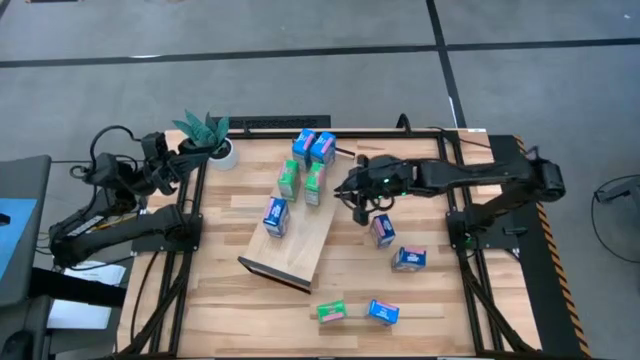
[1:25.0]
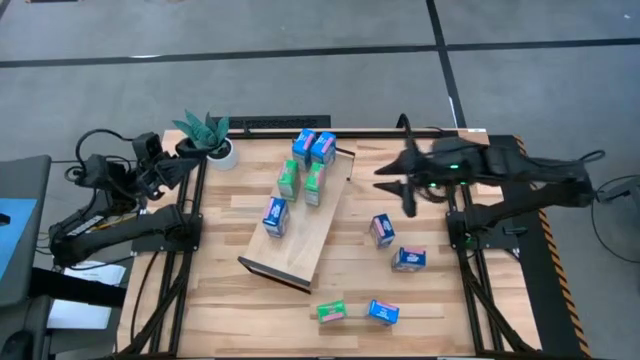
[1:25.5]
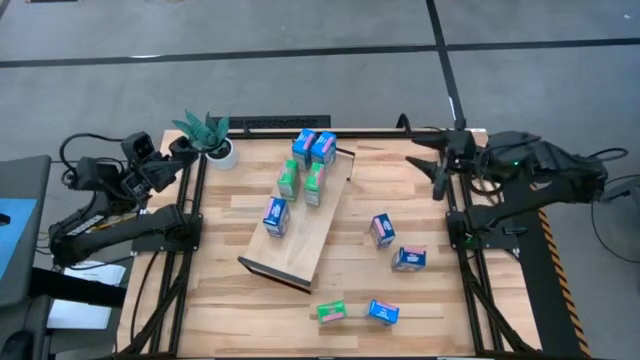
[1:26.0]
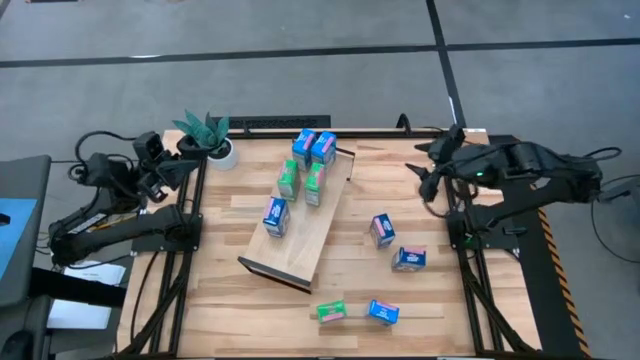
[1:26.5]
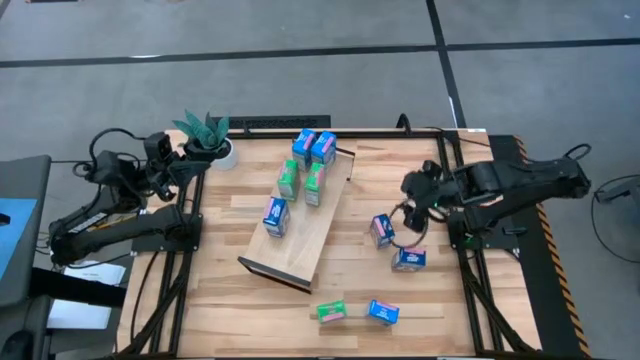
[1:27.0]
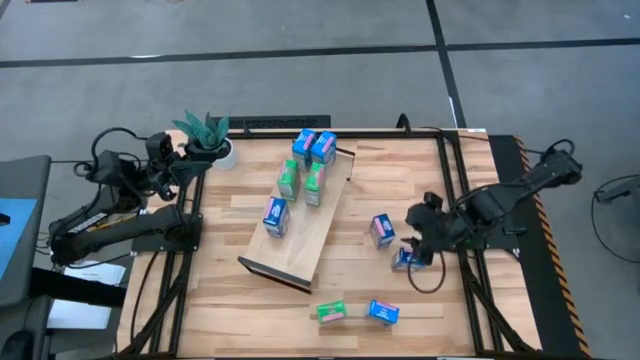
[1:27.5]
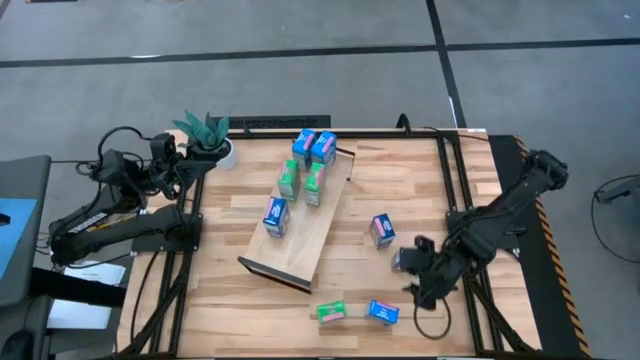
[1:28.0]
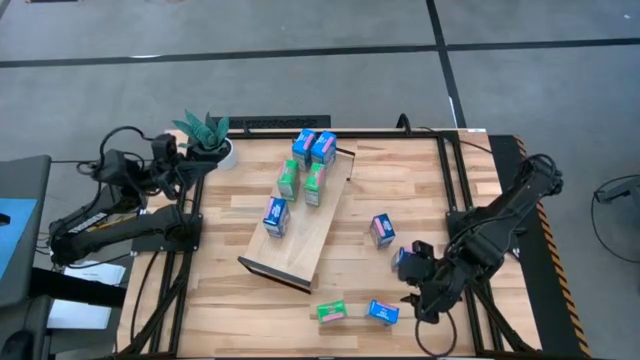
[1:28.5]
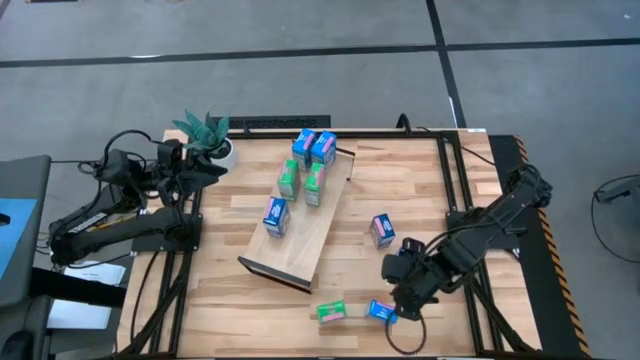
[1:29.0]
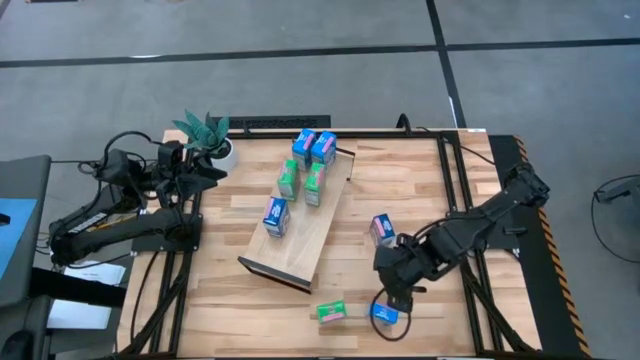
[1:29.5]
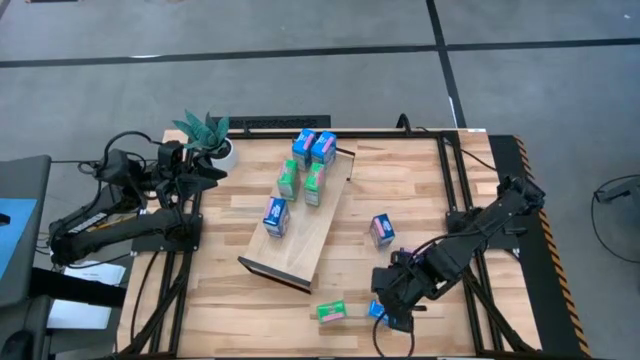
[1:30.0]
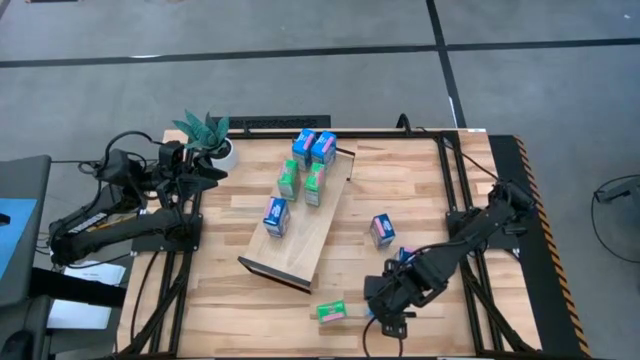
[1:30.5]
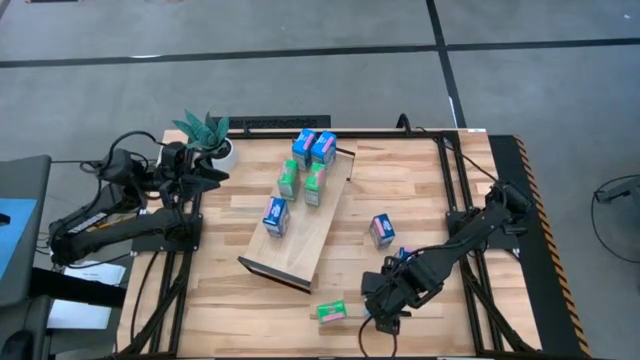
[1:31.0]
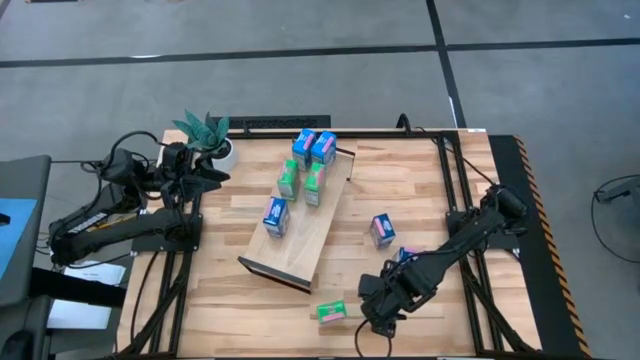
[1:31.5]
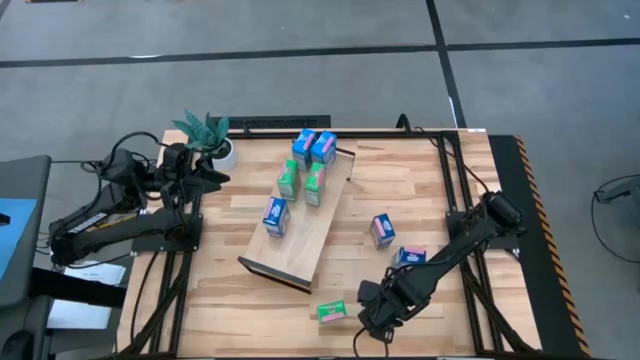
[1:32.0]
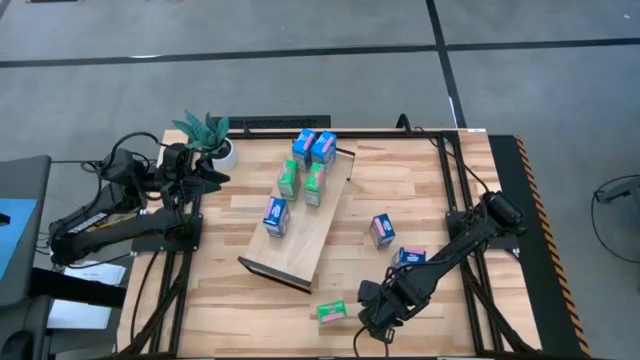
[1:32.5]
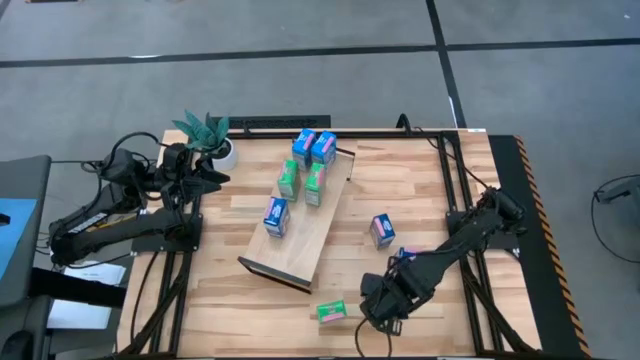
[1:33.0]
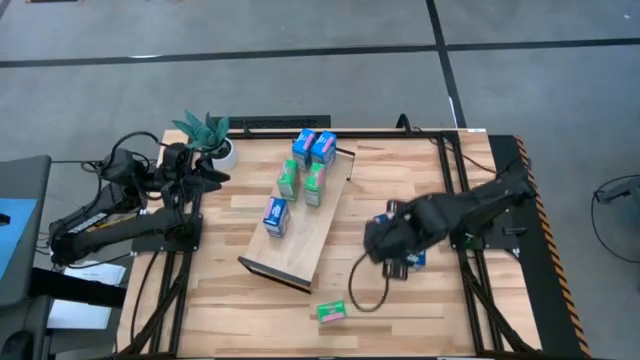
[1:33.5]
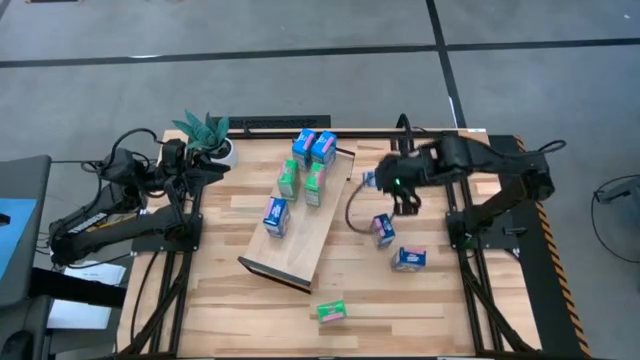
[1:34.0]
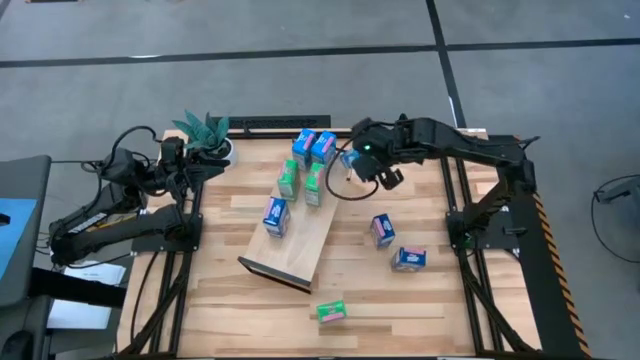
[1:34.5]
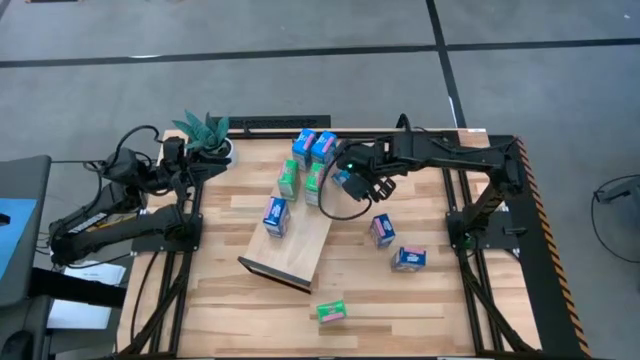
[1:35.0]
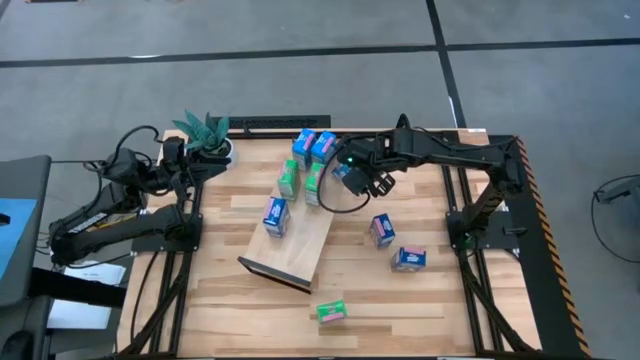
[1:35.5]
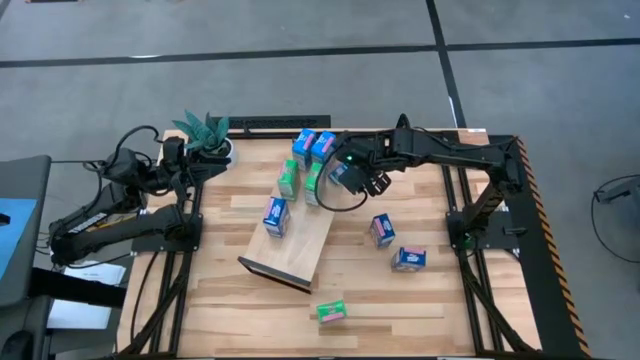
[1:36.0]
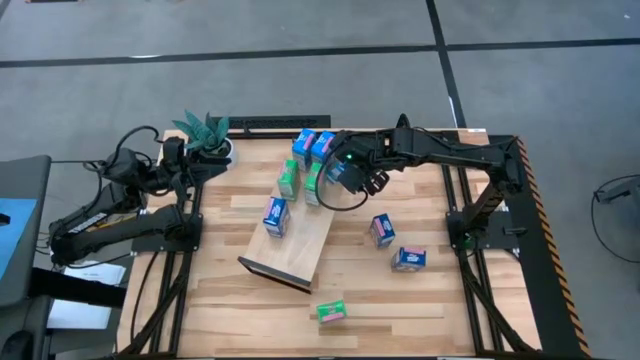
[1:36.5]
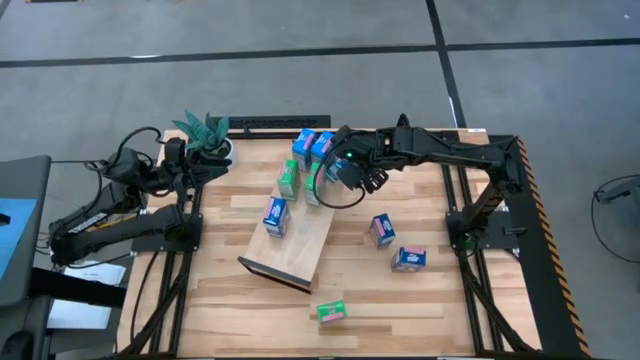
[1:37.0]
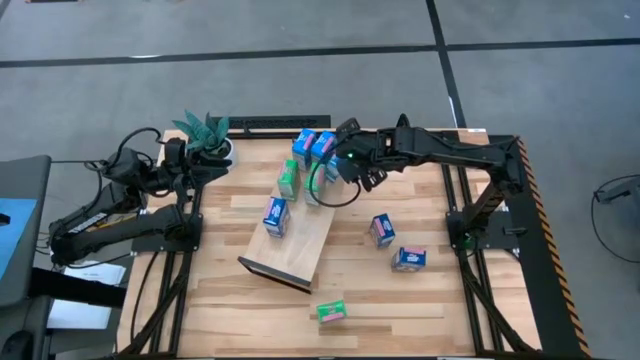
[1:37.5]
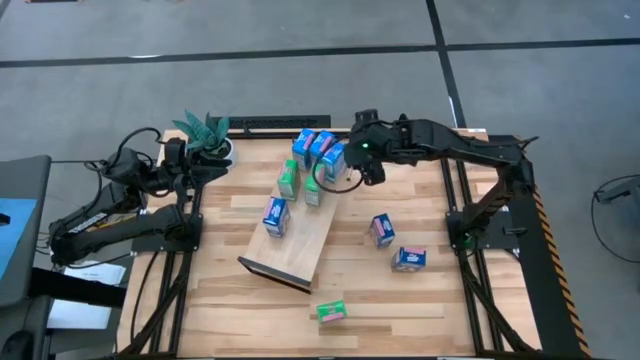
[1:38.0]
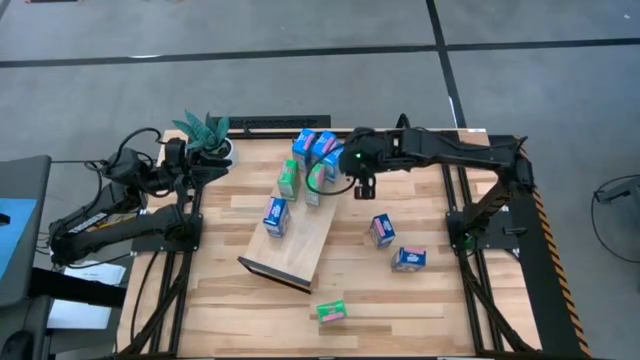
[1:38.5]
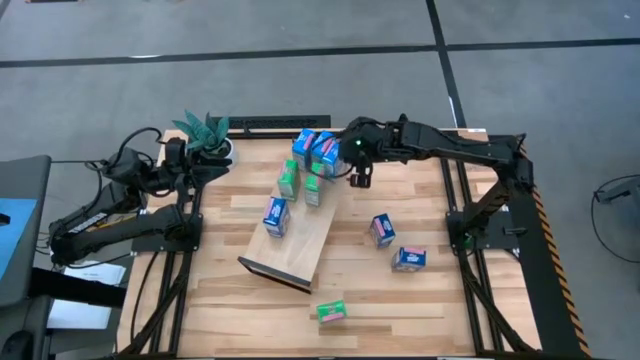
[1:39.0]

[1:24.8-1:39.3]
Task: Stack cereal on shelf
Put the light blue cereal box on the shelf aligned with the other light blue cereal boxes

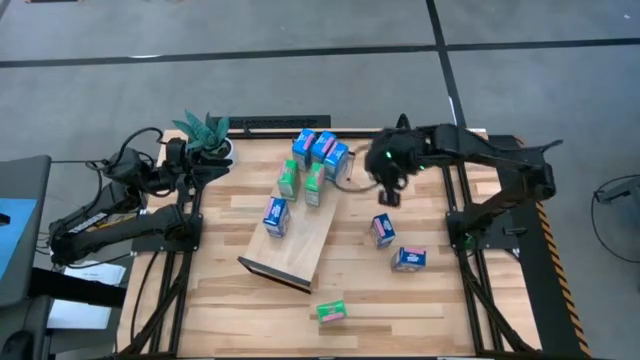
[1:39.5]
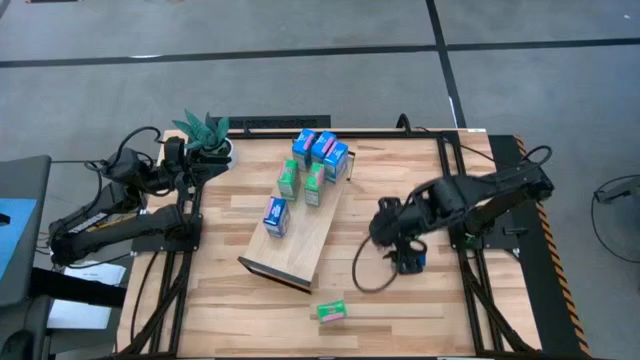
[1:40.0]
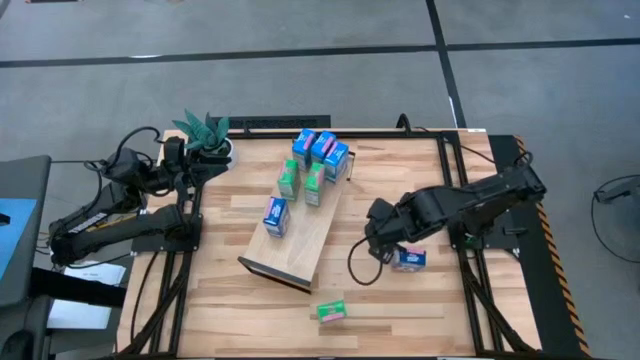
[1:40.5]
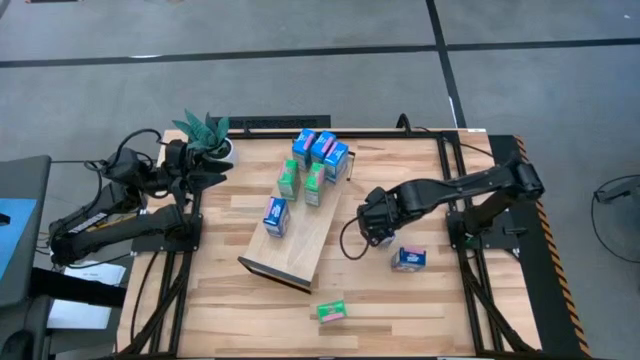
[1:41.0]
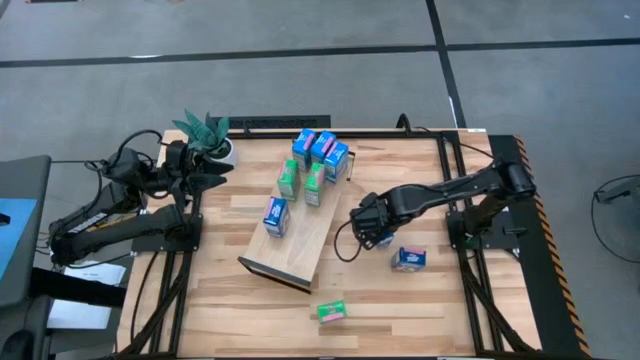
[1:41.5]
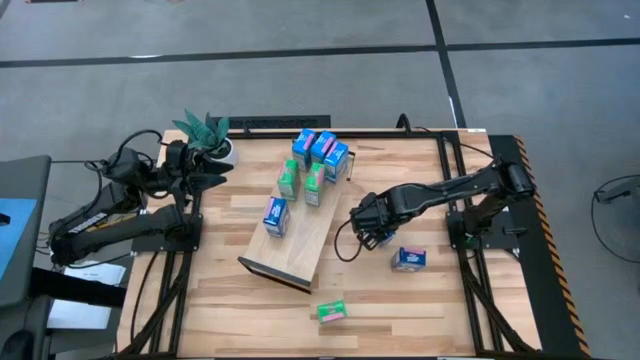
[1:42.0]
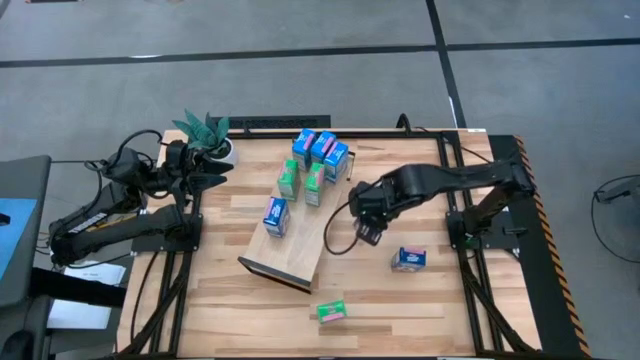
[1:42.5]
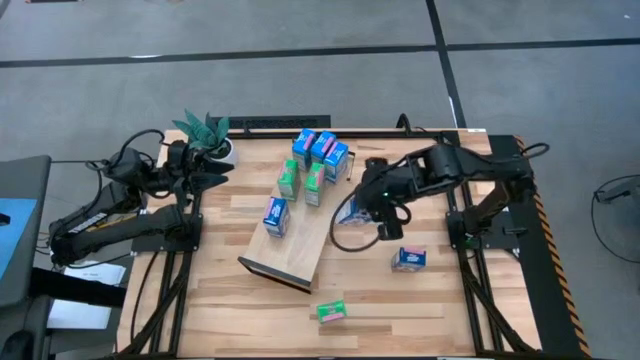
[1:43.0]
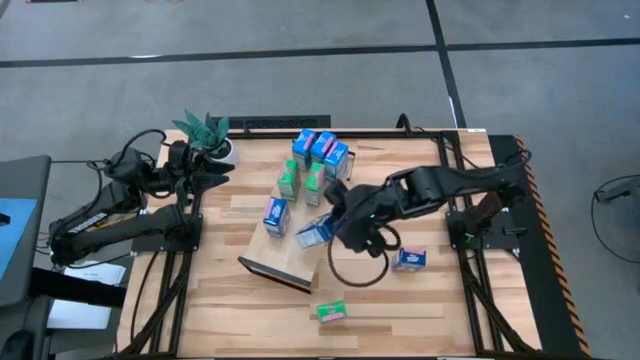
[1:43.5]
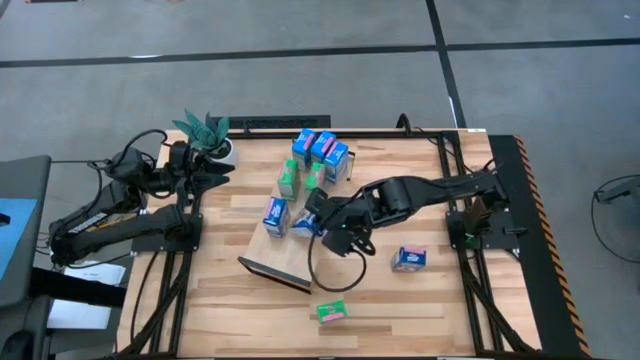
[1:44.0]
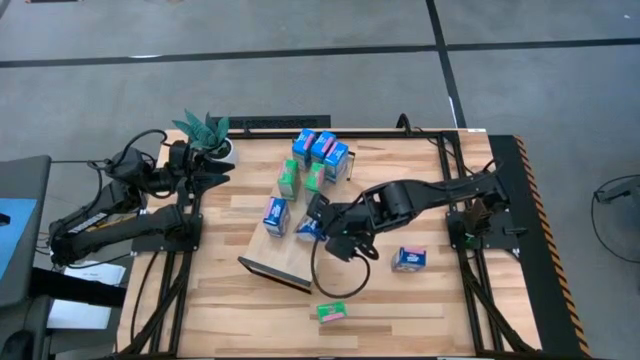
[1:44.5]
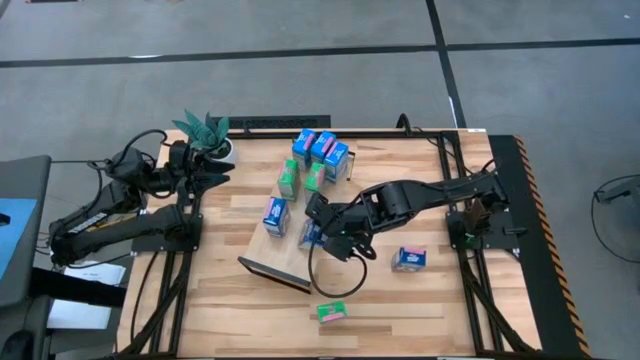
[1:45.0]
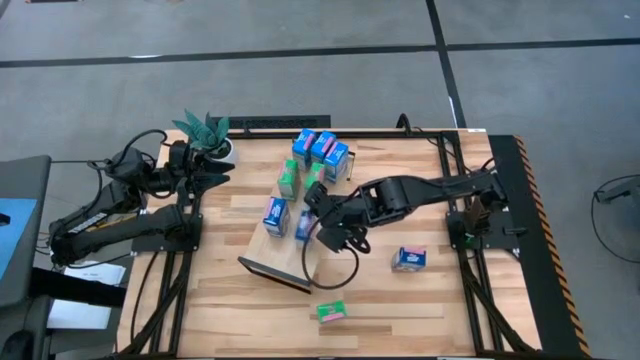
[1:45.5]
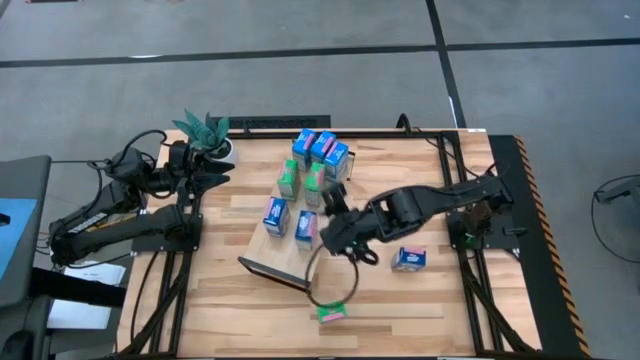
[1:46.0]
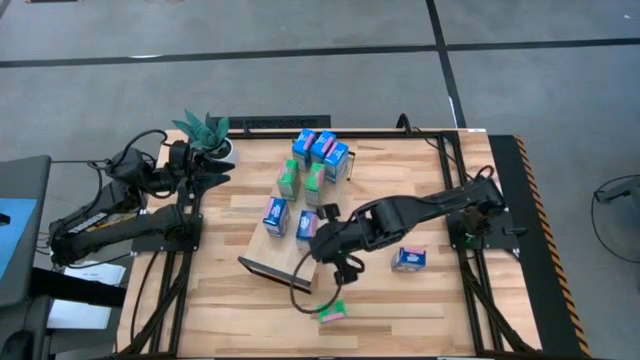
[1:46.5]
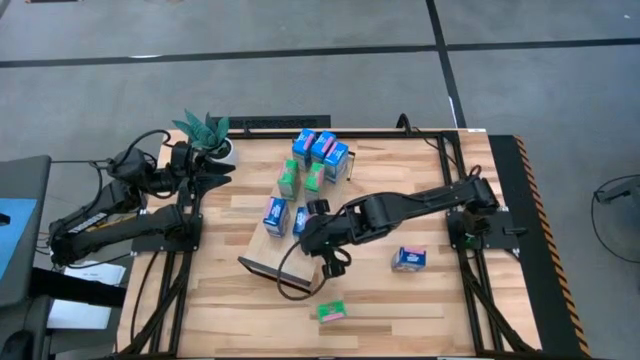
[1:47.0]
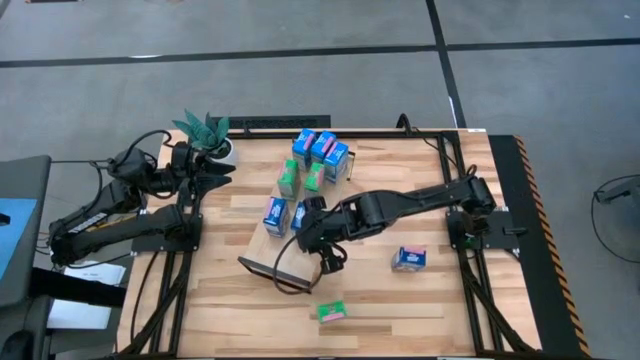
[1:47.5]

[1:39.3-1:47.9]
Put the top dark blue cereal box on the shelf aligned with the other dark blue cereal box
